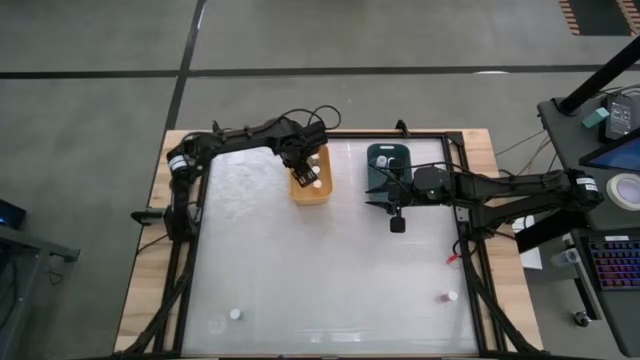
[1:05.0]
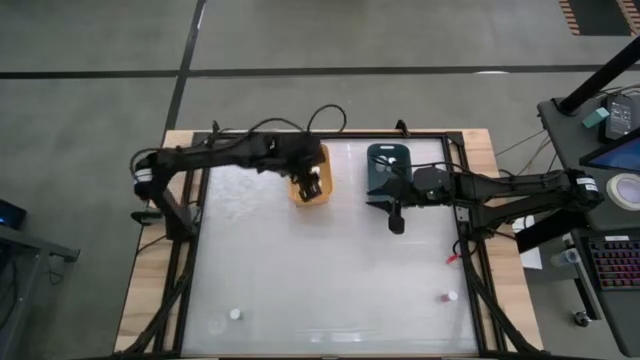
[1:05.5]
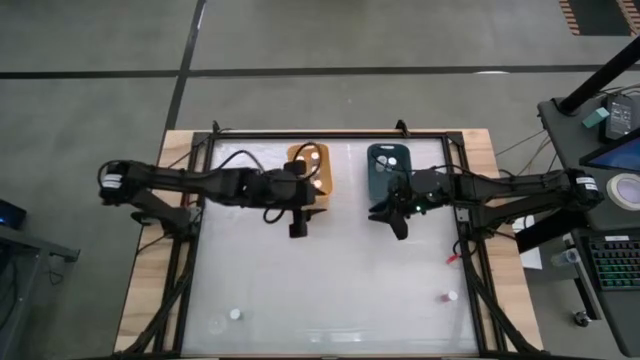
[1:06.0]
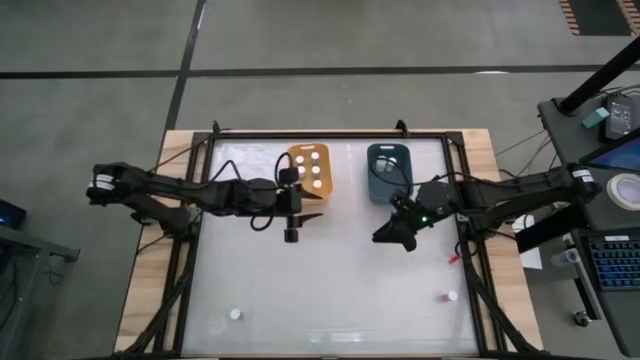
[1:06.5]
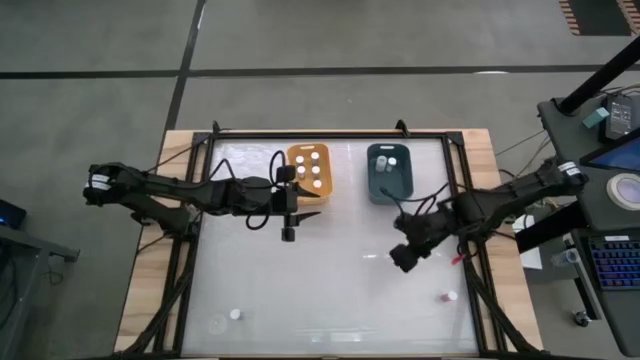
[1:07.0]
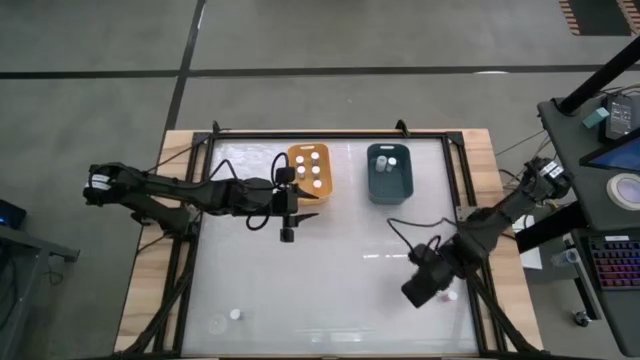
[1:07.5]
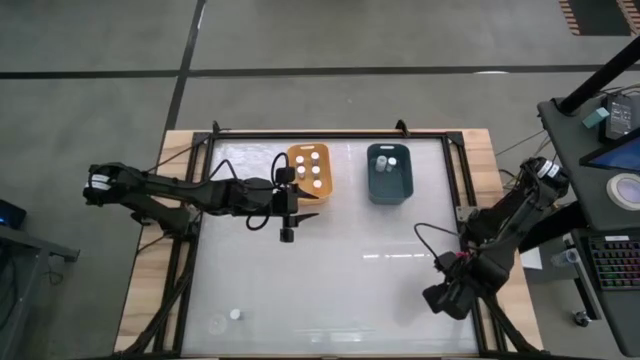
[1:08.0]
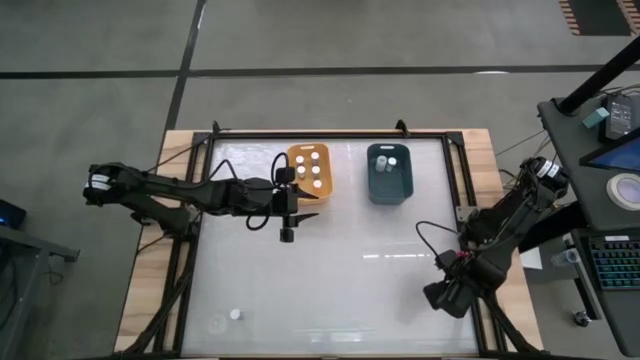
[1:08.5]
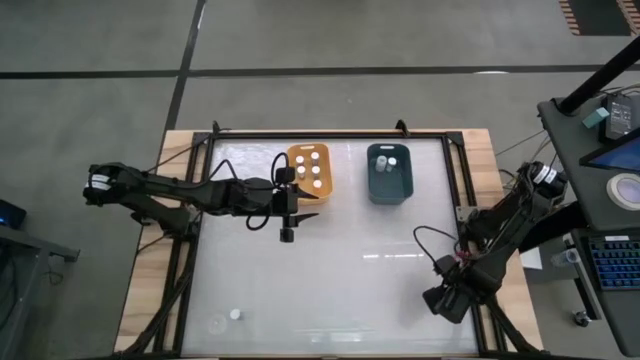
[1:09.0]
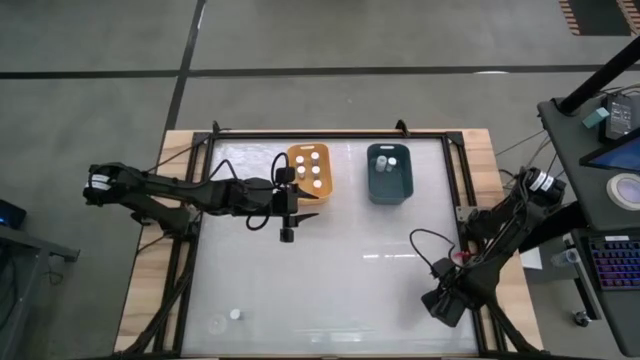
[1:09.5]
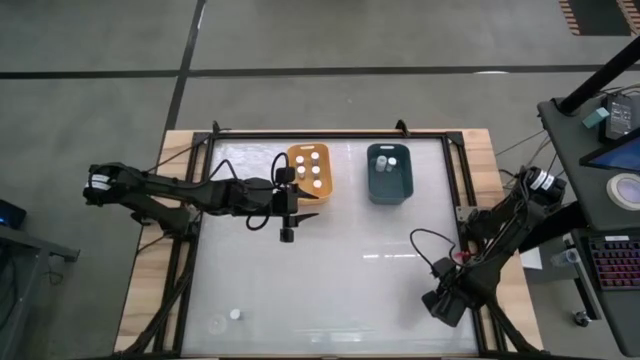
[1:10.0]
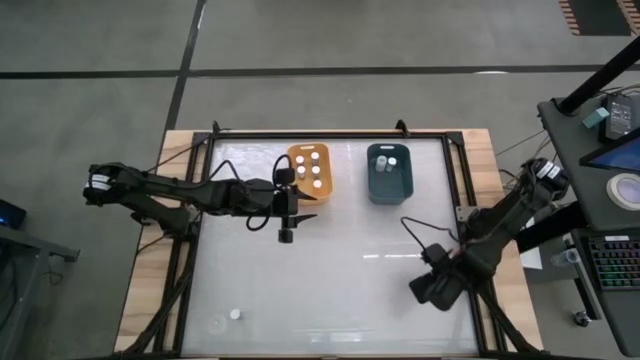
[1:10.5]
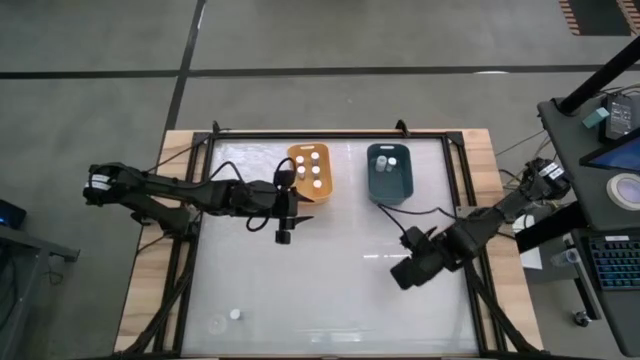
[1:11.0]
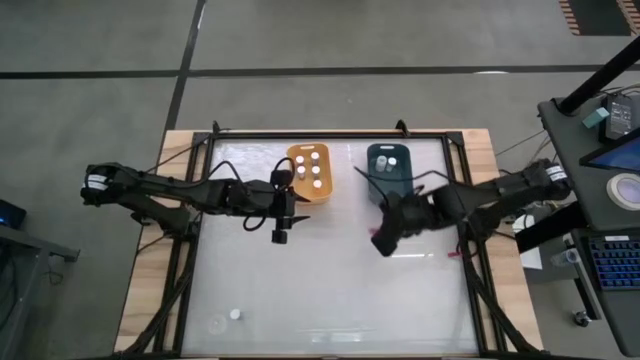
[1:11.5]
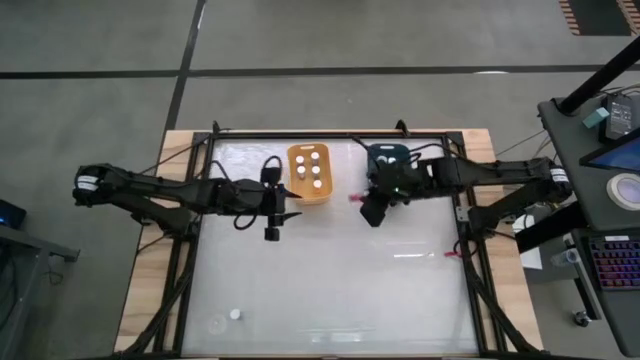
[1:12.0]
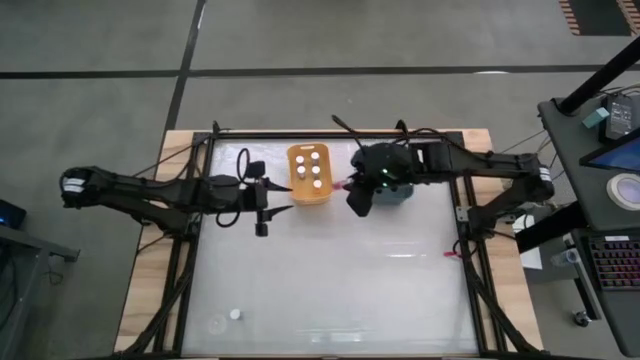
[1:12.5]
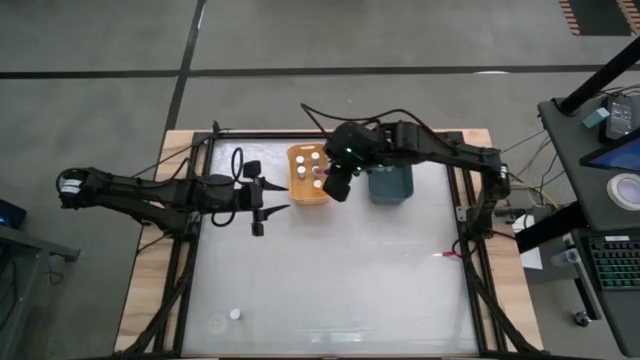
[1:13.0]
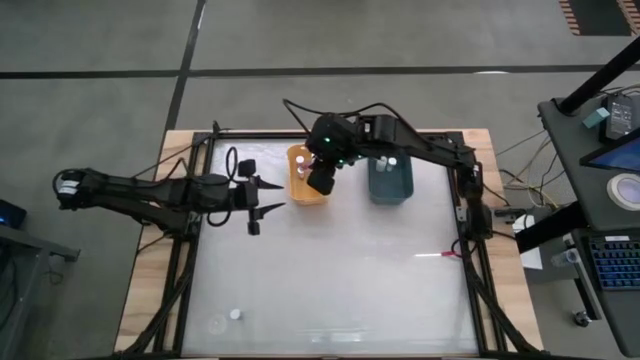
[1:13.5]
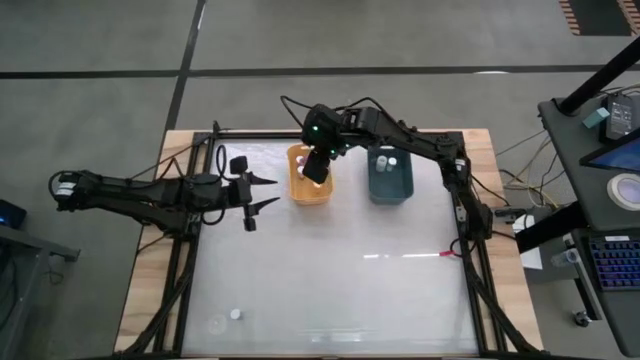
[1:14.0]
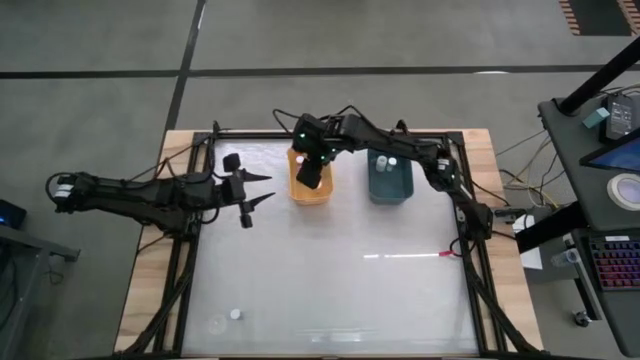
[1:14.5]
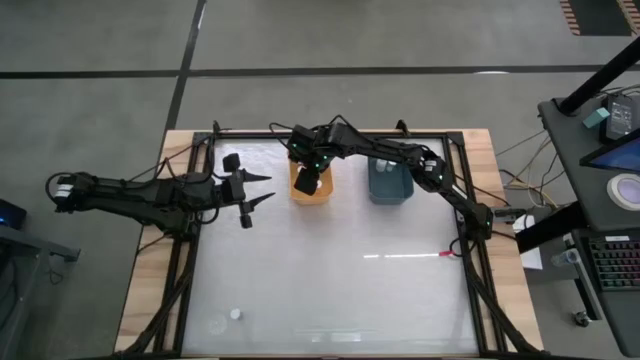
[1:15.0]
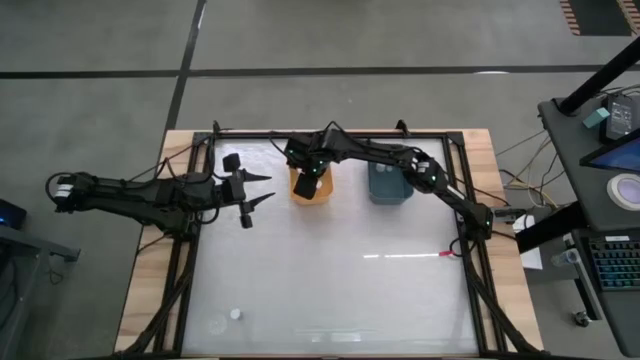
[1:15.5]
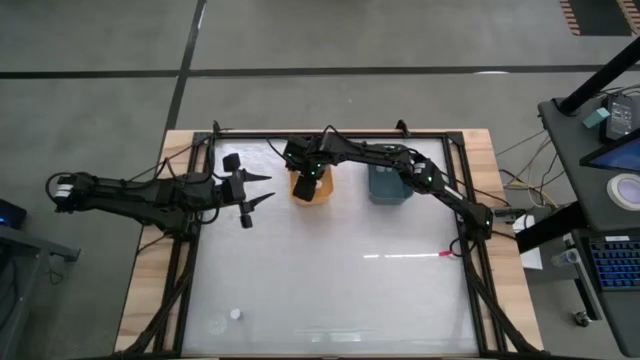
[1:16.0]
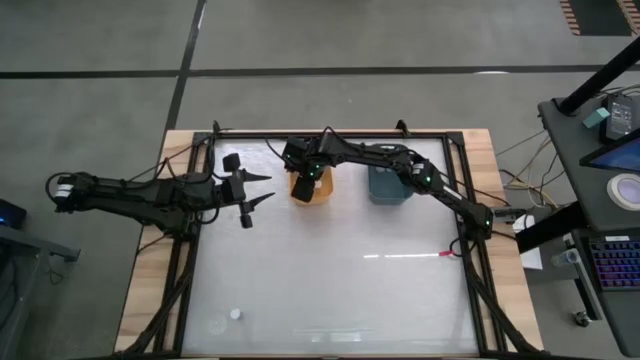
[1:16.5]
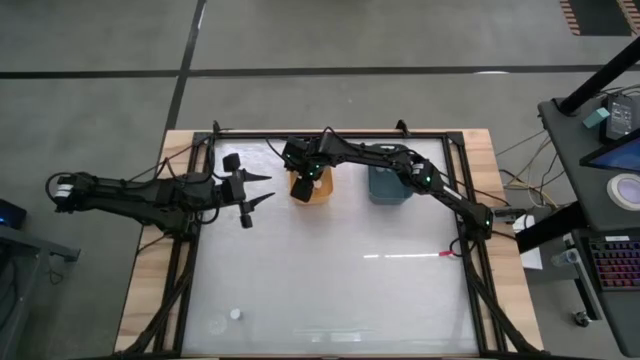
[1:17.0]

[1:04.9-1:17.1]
Task: Pick and place medicine bottles into bin by pill shape (circle, oval)
Put the pink capsule bottle into the yellow bin

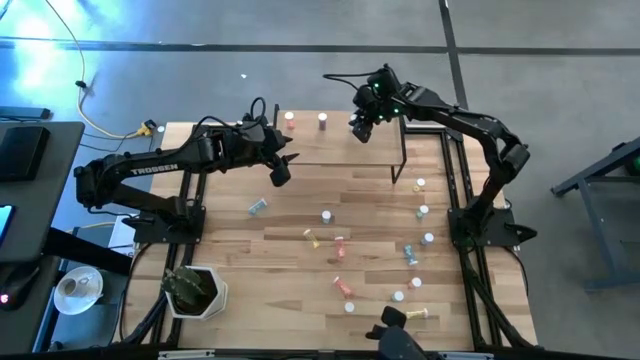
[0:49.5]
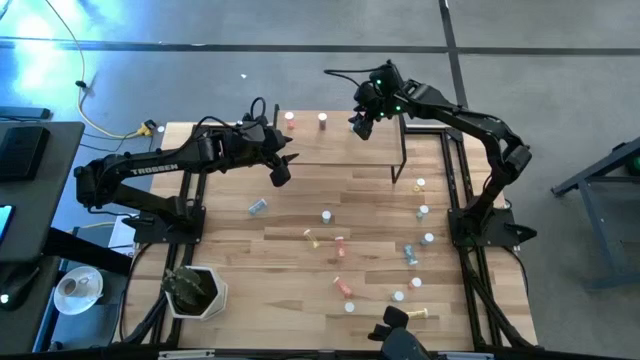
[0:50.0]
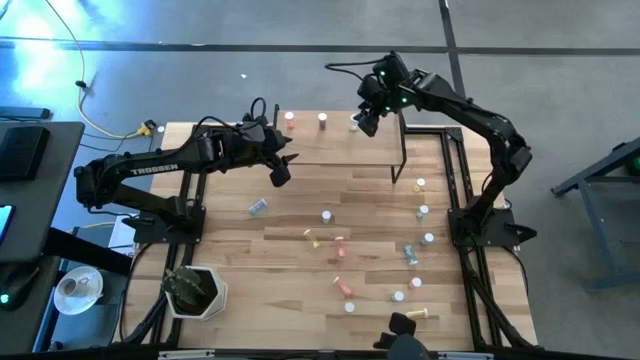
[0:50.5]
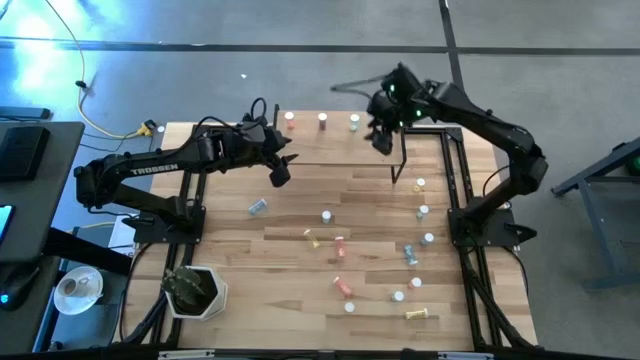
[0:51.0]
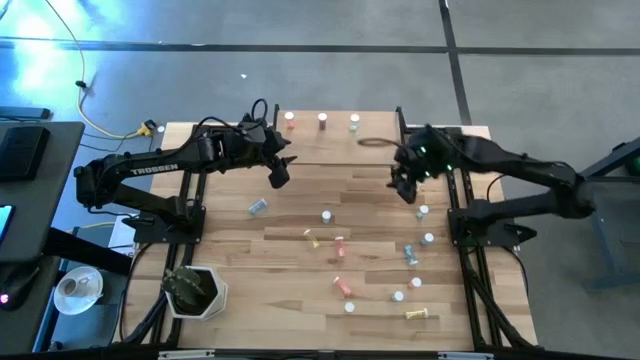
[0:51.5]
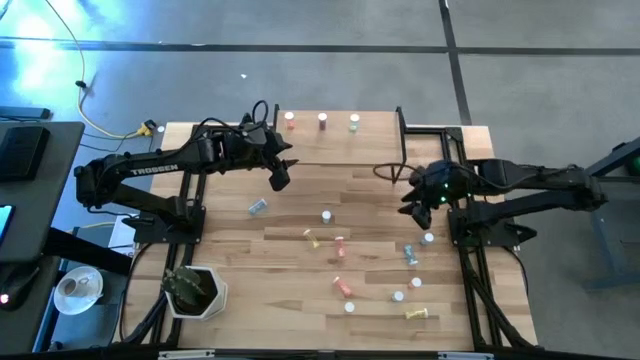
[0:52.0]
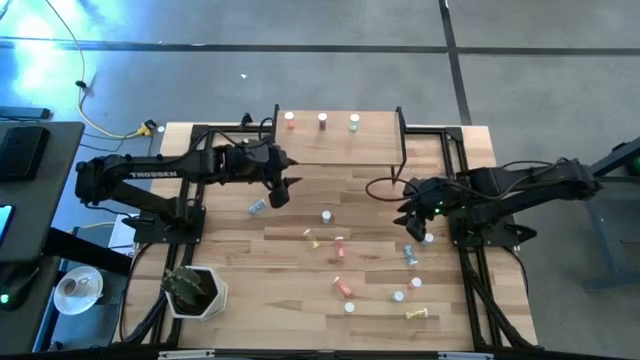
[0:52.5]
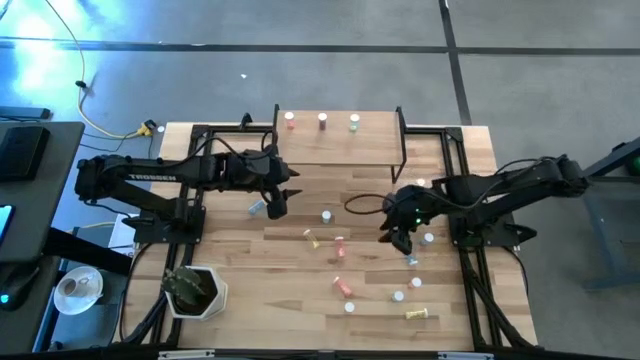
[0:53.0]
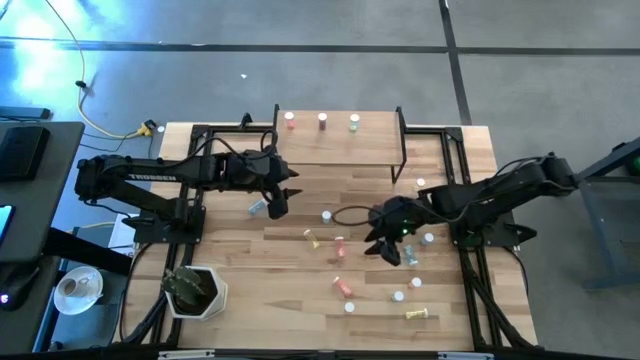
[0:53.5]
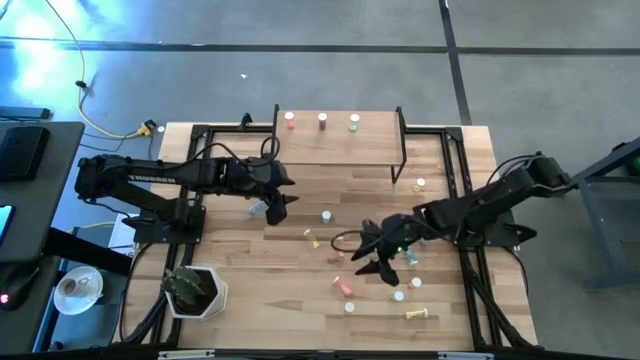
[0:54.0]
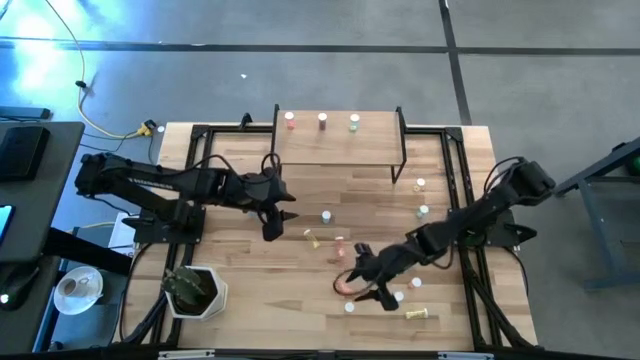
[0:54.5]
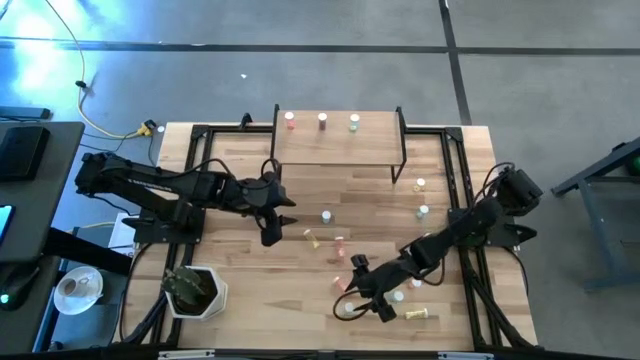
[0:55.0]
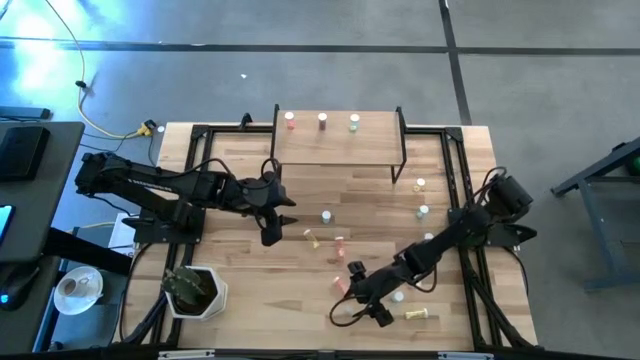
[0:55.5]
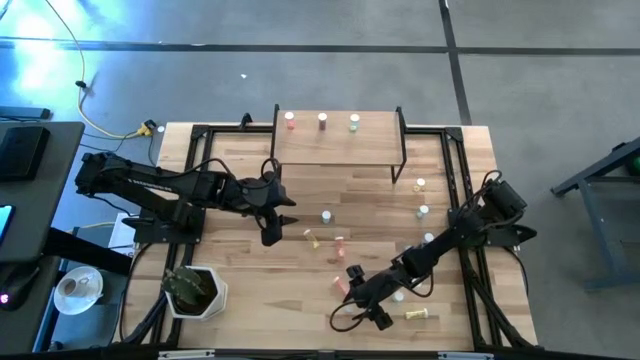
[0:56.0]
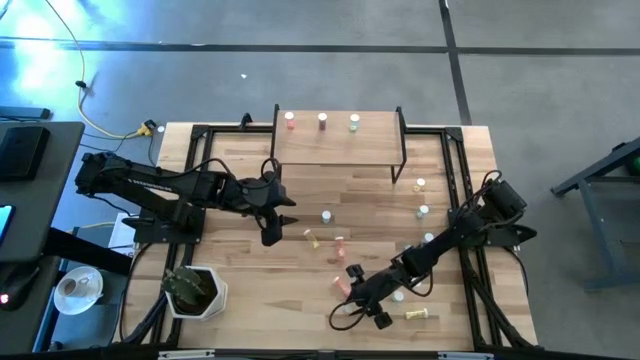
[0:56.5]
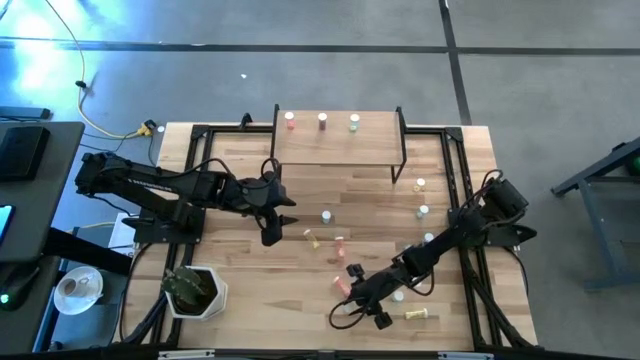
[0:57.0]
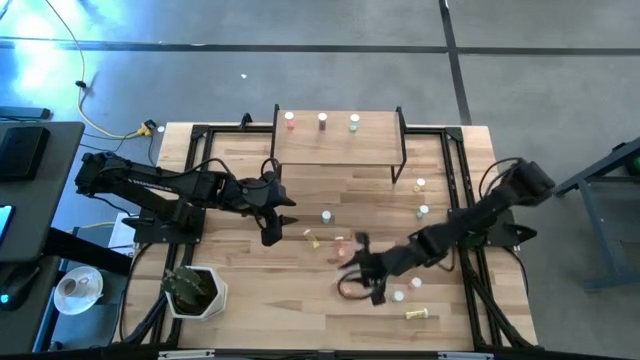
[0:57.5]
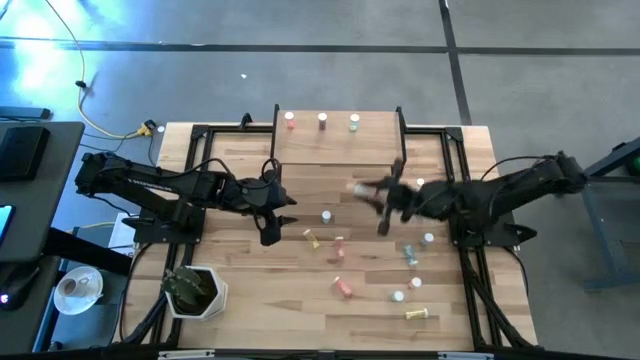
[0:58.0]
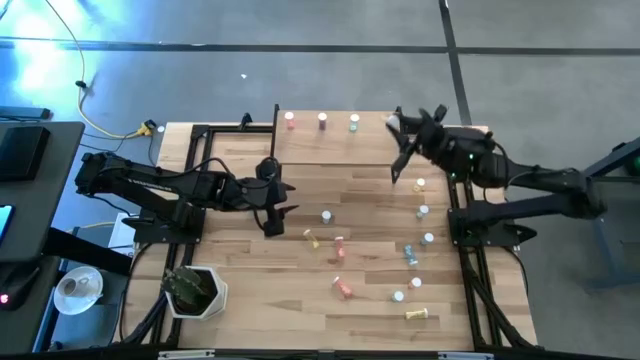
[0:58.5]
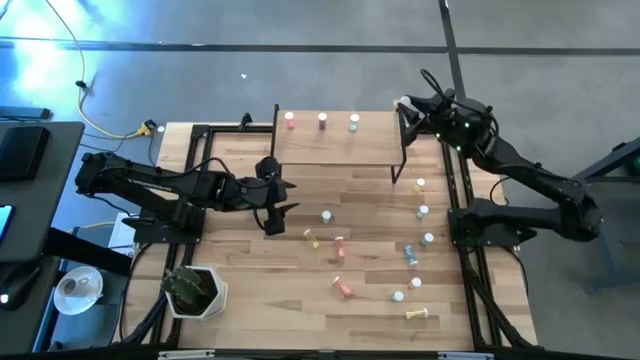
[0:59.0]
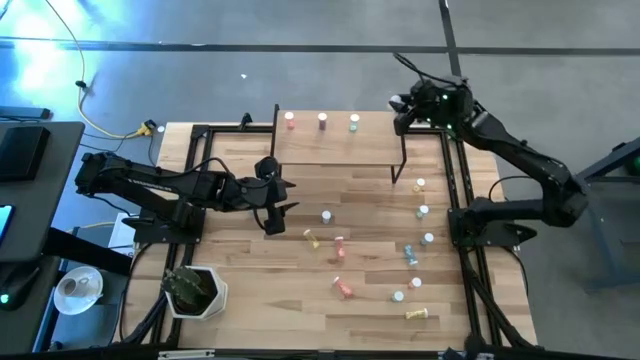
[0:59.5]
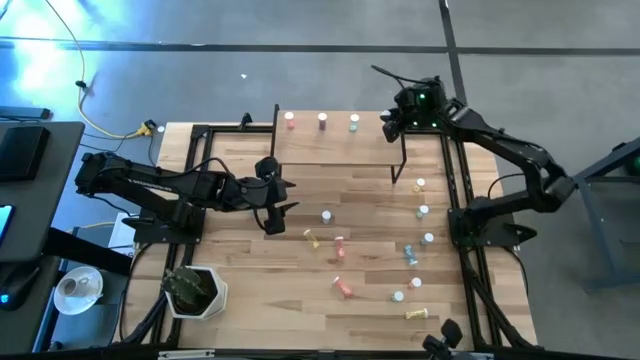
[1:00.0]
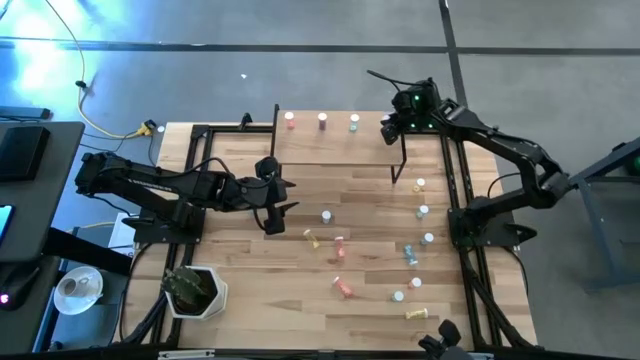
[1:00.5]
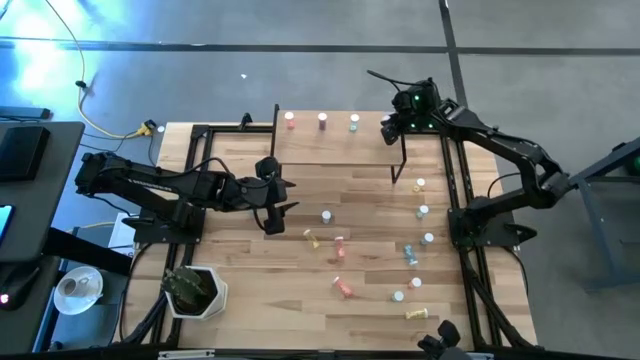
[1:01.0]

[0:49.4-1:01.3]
Task: Pick and place medicine bottles onto shelf by color
Put the yellow pill bottle on the shelf
